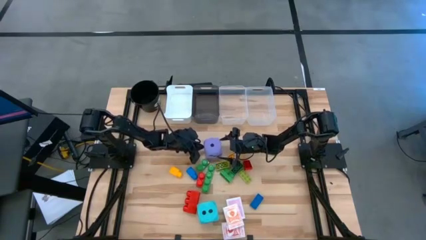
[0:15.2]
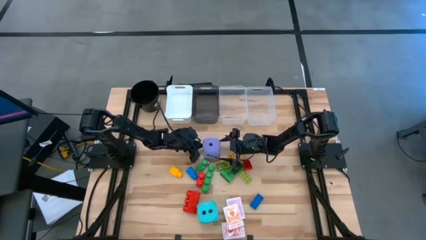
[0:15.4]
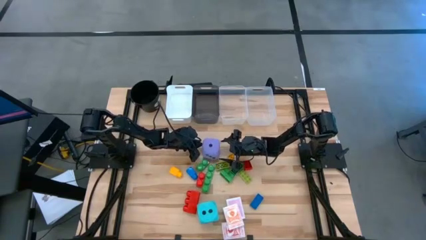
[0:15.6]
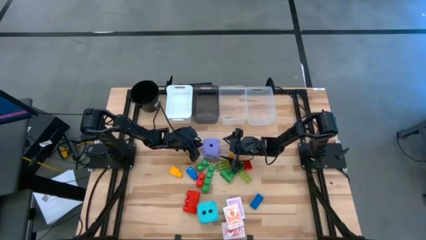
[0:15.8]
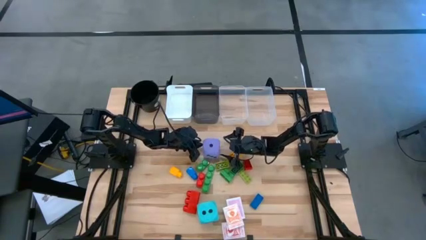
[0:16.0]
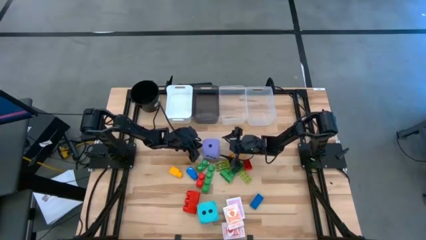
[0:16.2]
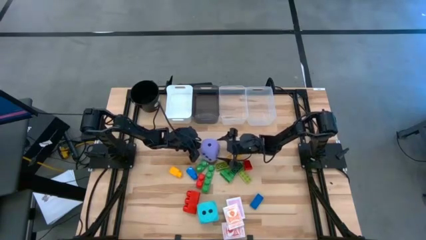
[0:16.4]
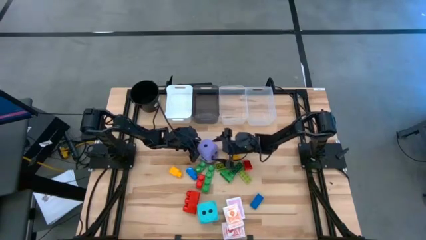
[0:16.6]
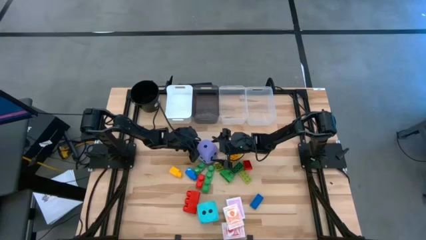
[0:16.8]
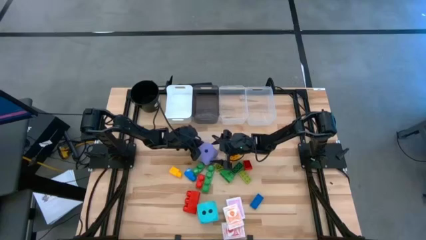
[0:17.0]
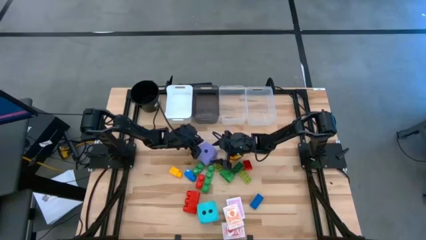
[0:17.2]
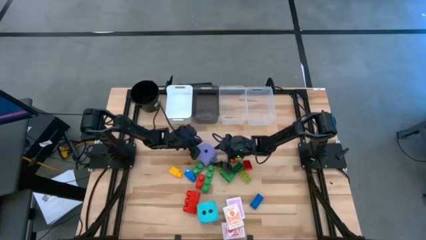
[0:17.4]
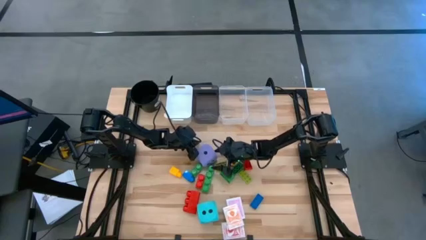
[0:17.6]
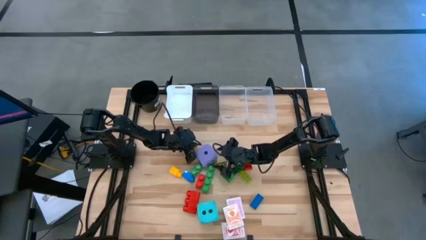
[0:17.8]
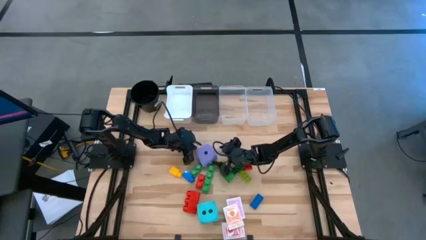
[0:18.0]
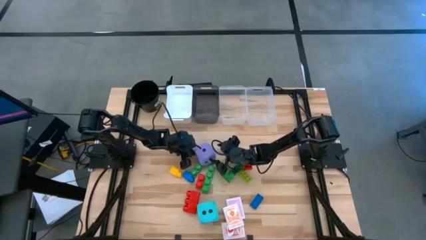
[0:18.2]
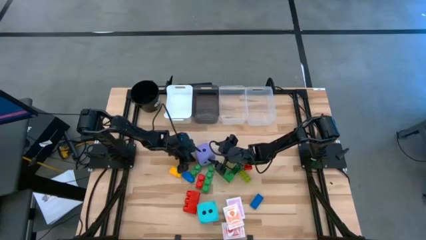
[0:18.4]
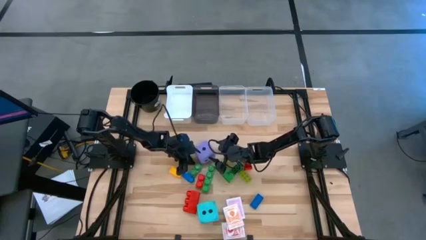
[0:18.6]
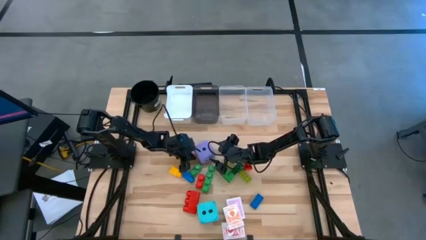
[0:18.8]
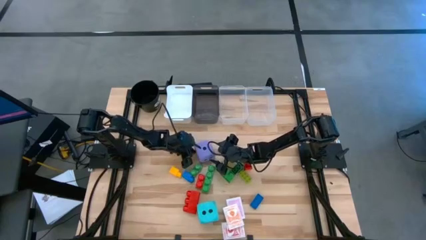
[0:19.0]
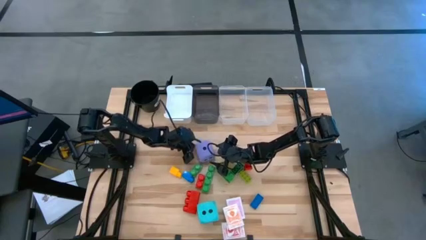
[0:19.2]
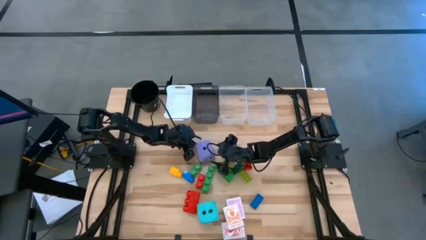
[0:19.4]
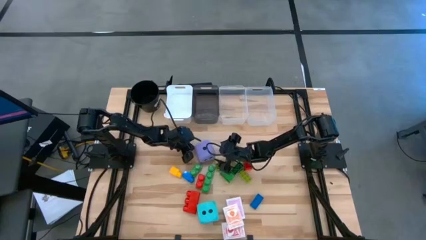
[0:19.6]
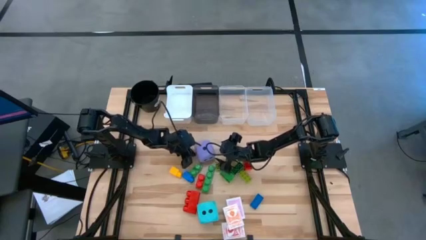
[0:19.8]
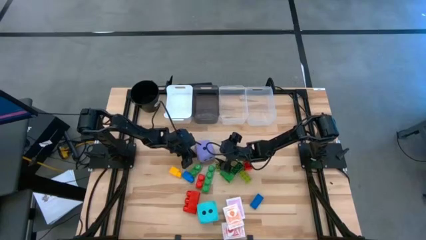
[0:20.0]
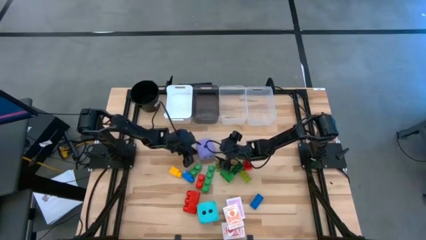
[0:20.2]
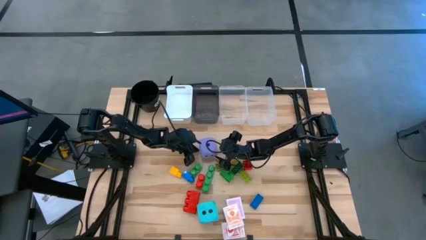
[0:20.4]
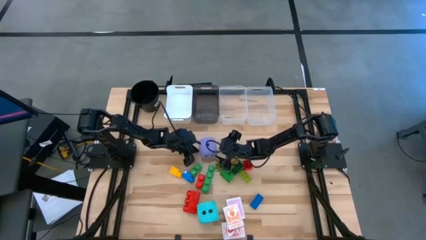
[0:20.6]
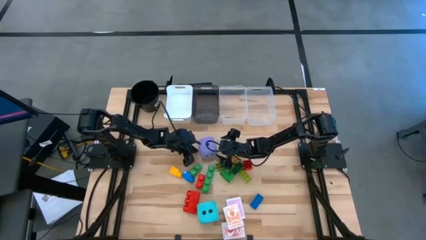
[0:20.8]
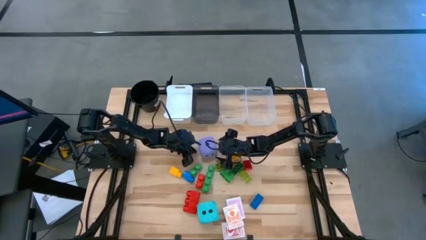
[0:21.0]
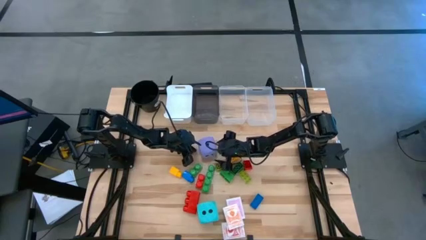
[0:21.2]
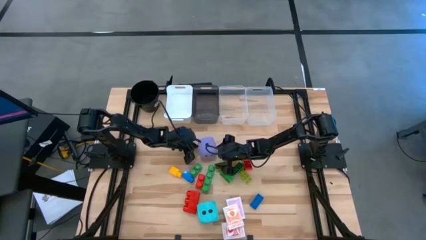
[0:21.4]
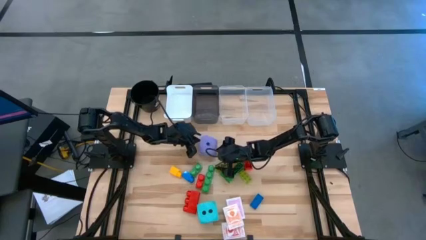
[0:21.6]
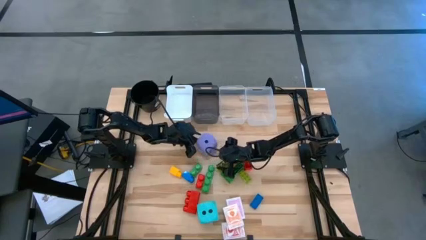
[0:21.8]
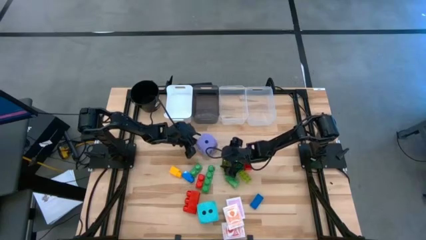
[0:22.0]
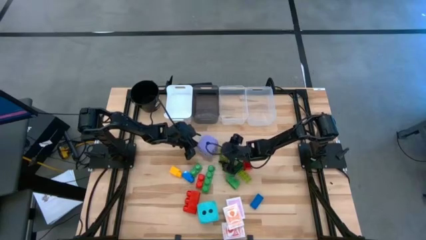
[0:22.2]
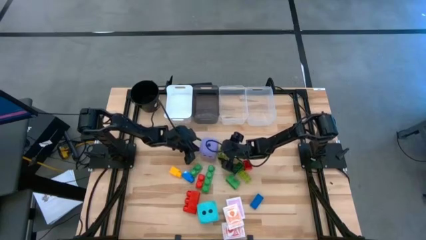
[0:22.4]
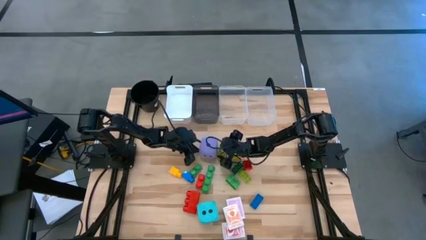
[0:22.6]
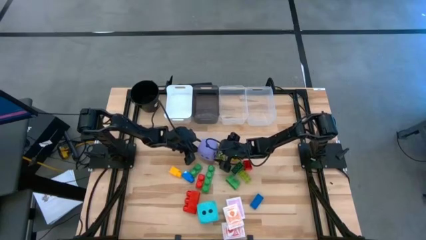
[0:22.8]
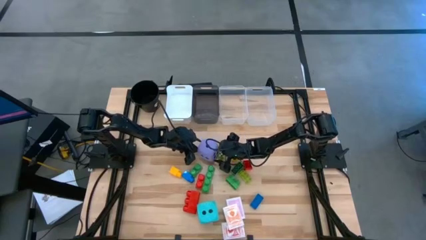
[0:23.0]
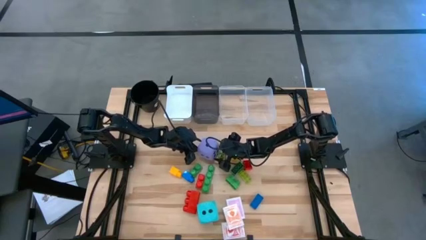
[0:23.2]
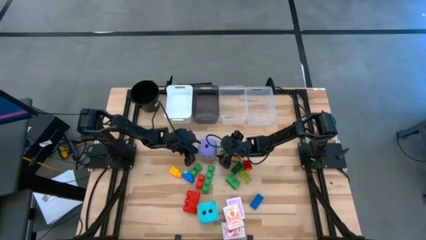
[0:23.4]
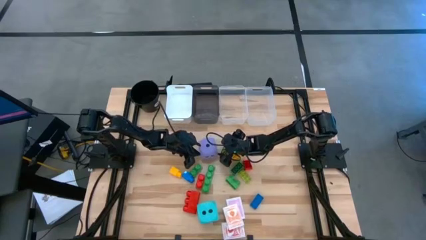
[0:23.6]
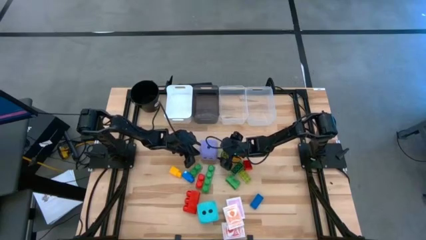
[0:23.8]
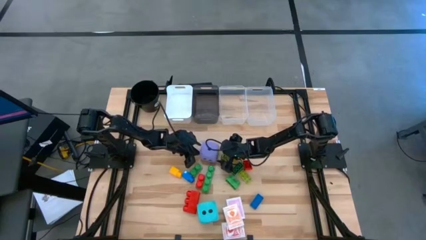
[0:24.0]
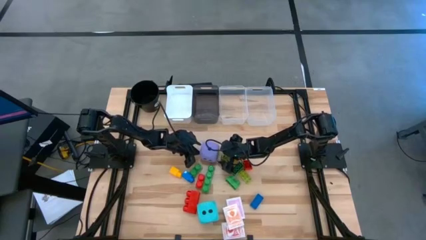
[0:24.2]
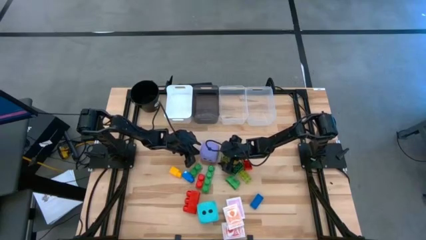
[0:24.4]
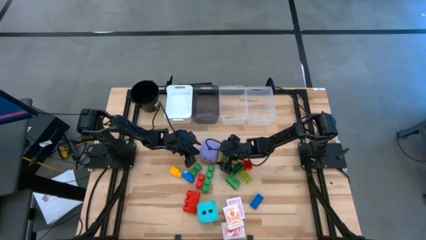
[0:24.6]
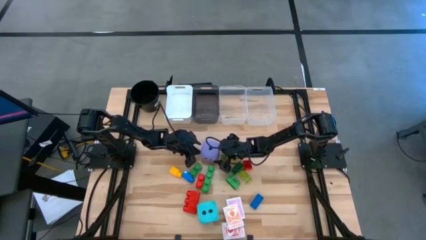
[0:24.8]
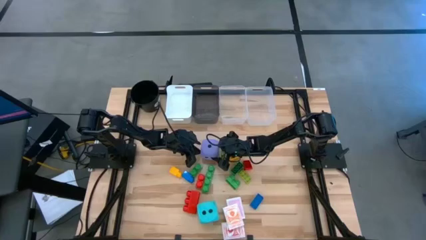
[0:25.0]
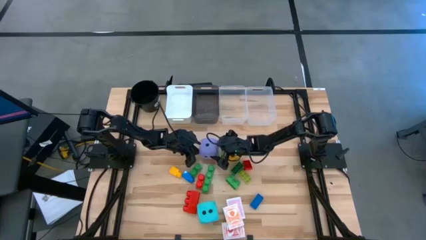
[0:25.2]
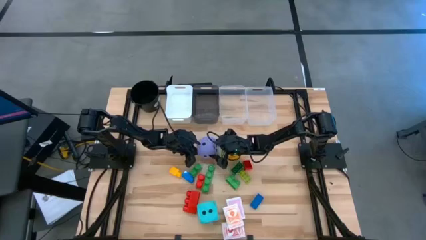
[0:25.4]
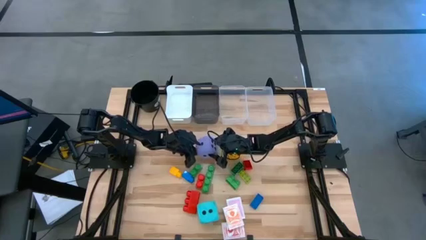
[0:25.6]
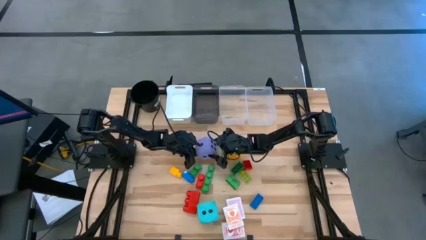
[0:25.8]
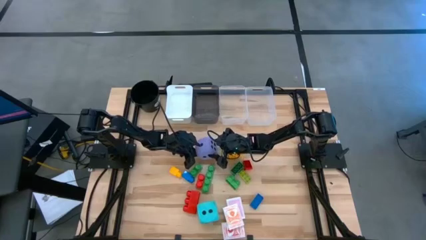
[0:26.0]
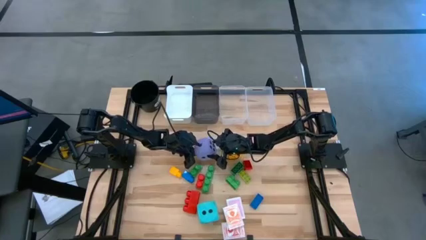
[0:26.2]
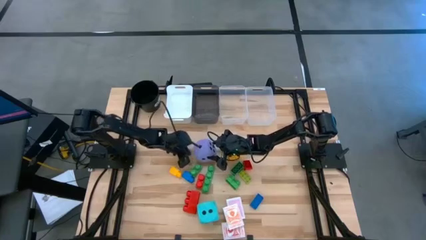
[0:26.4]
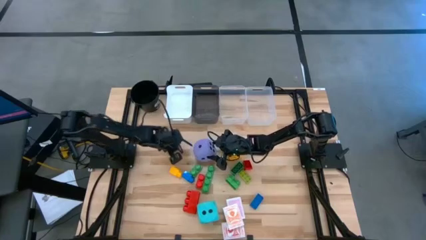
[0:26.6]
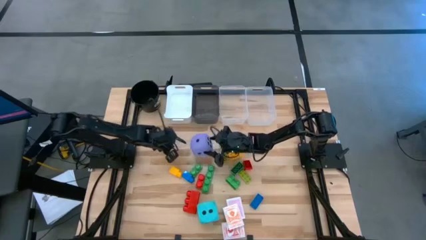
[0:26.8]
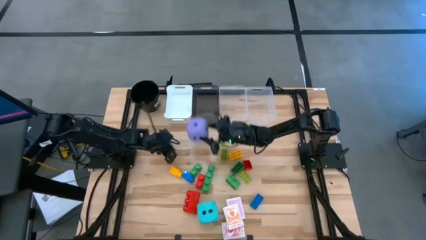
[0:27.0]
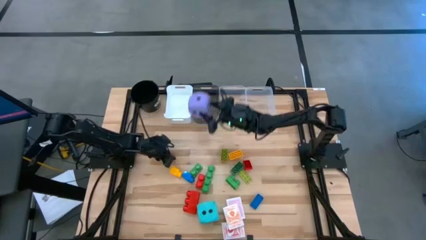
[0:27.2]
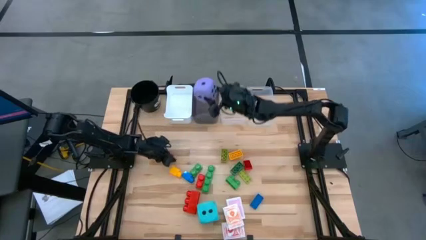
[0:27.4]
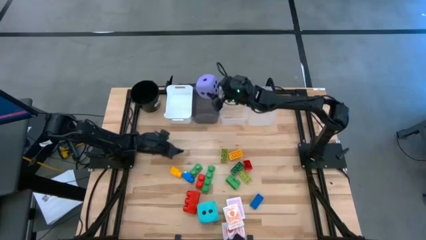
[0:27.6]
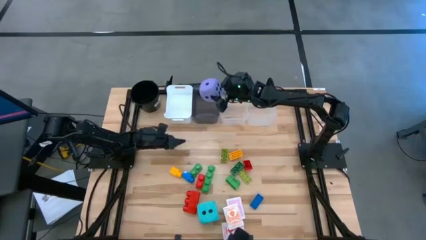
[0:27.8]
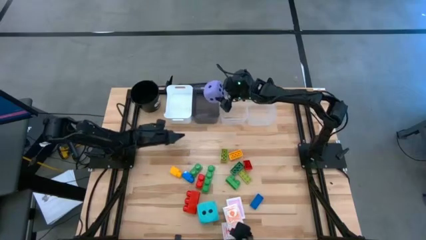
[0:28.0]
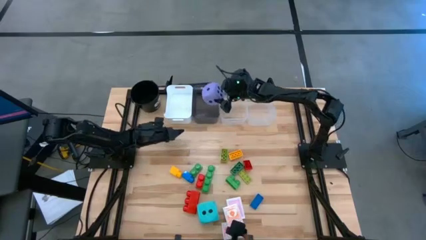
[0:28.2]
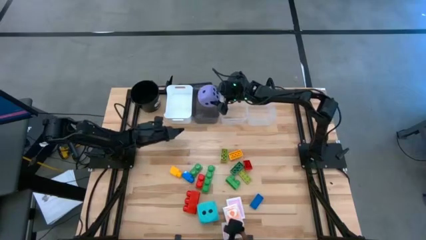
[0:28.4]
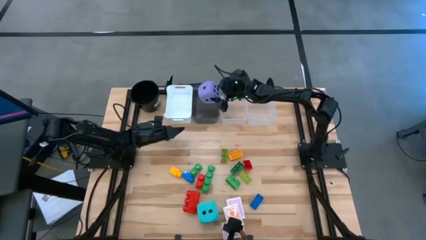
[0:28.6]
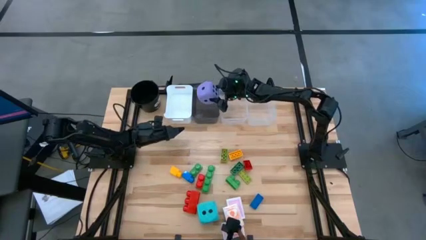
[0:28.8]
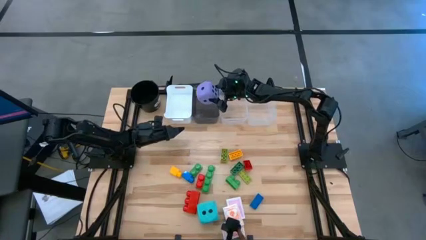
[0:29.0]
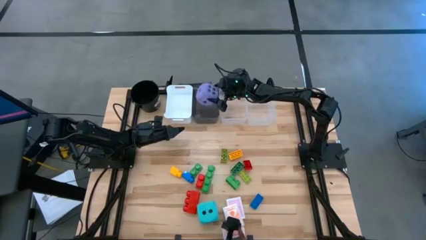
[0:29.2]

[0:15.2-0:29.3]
Task: Pick & Place Toys
Put the purple dice into the black bin
